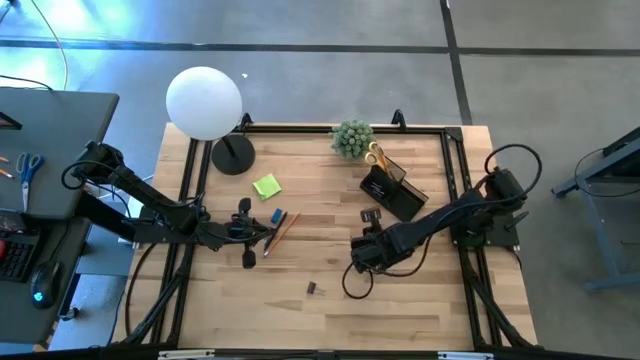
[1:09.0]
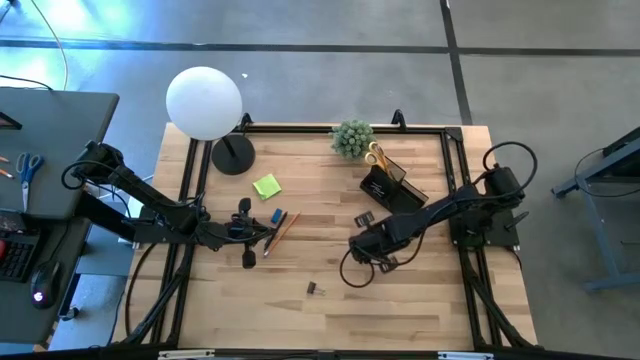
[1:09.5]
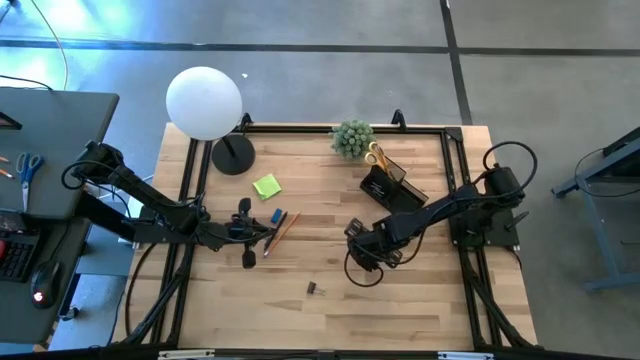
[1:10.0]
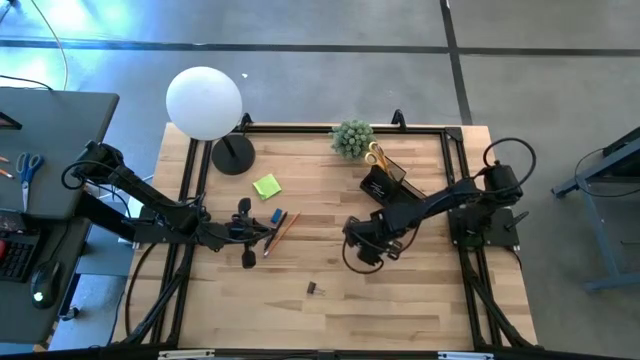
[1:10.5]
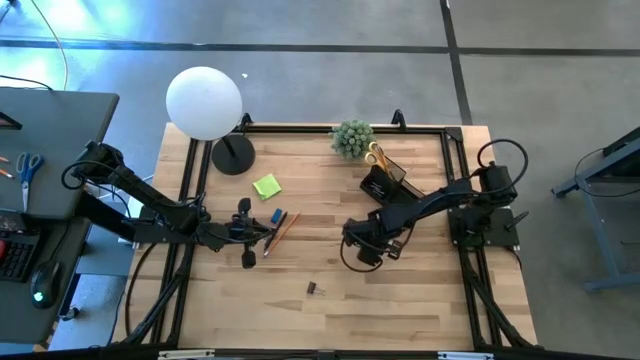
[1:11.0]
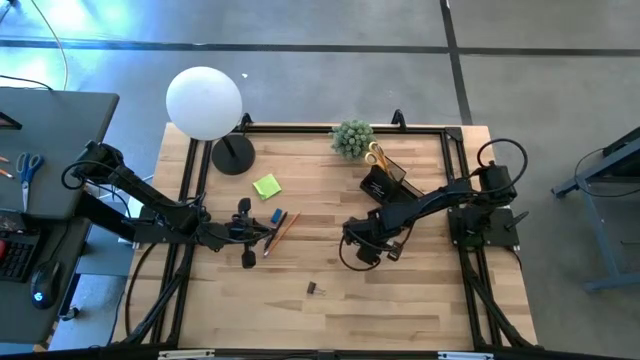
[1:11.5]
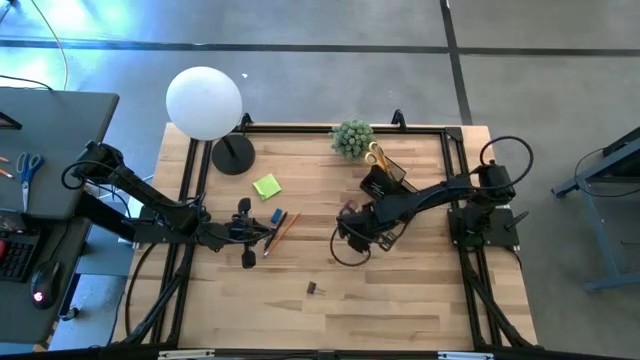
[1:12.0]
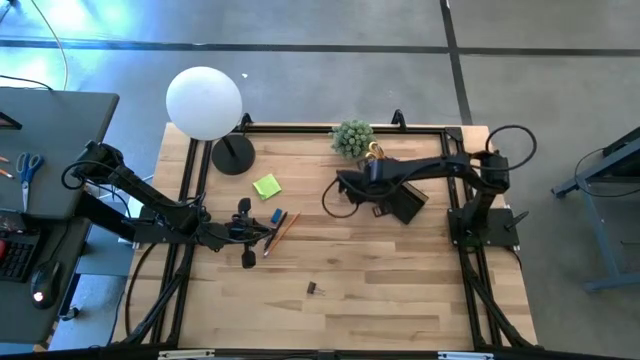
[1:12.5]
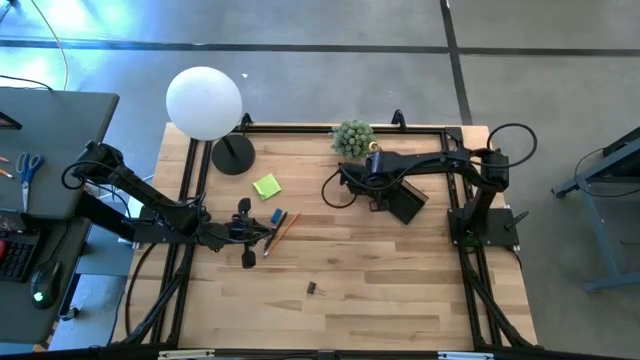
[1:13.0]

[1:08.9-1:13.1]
Task: Pick and place office supplies into organizer
Put the blue binder clip into the desk organizer

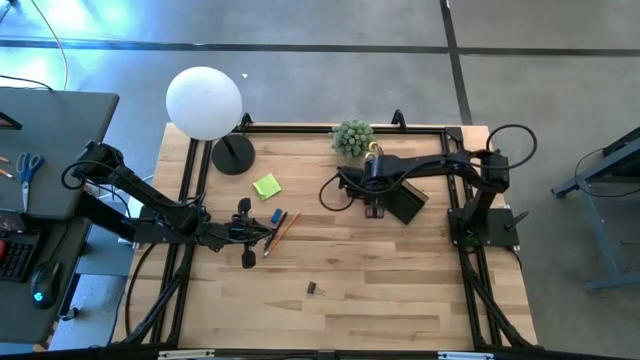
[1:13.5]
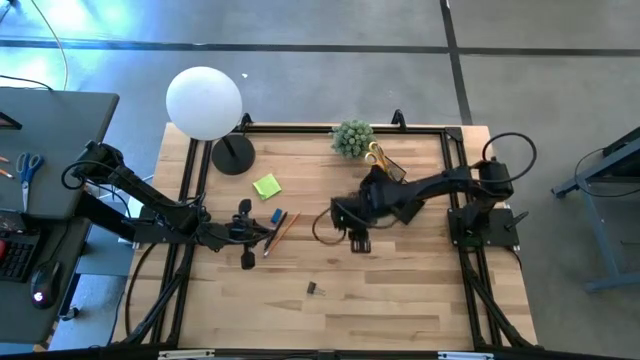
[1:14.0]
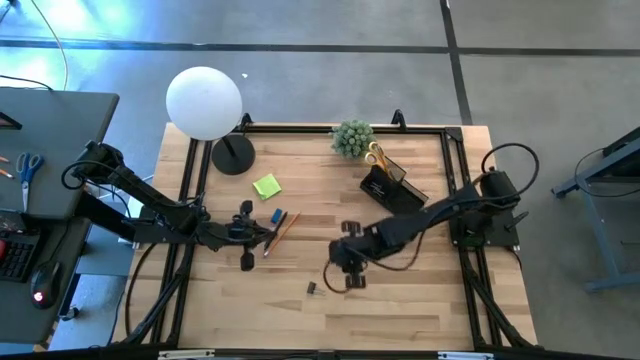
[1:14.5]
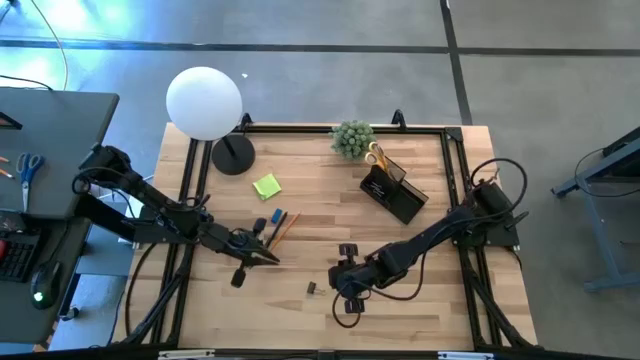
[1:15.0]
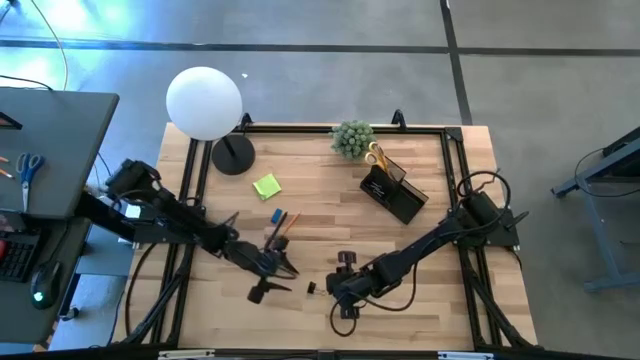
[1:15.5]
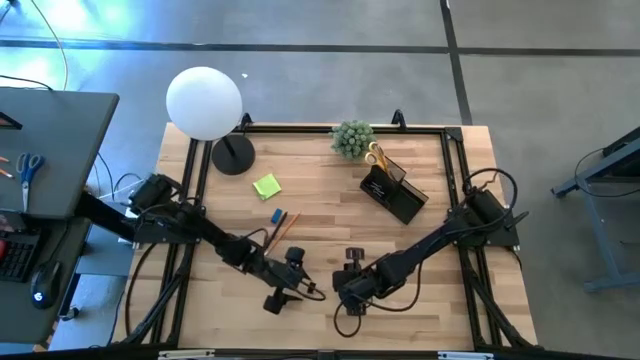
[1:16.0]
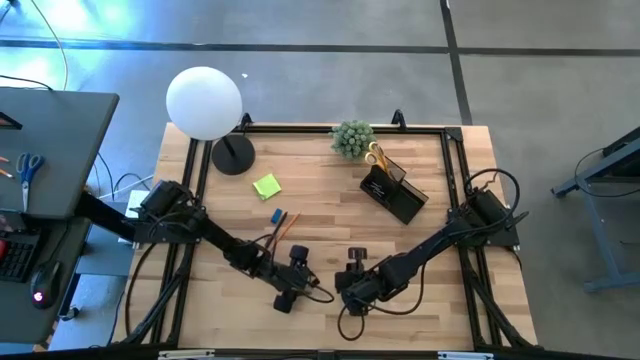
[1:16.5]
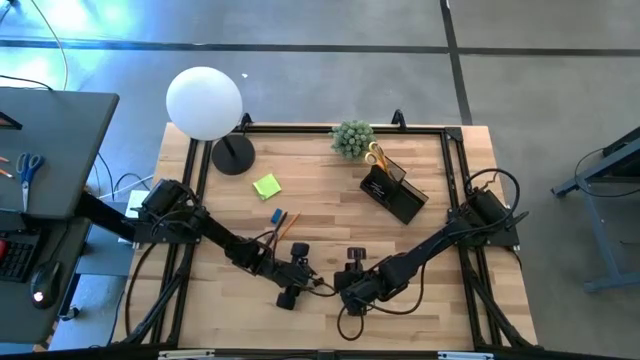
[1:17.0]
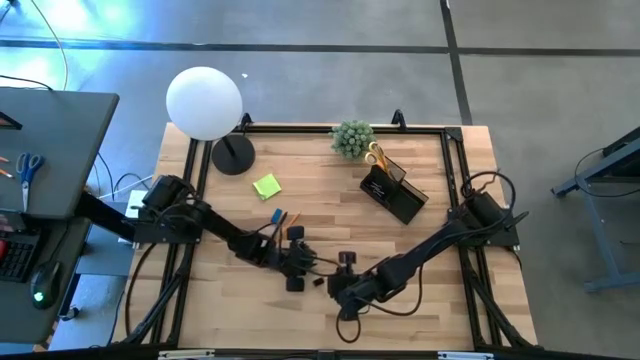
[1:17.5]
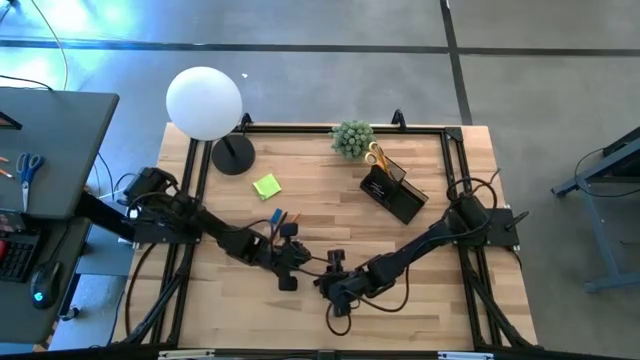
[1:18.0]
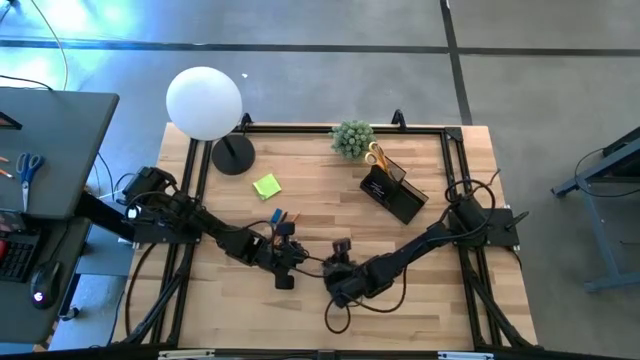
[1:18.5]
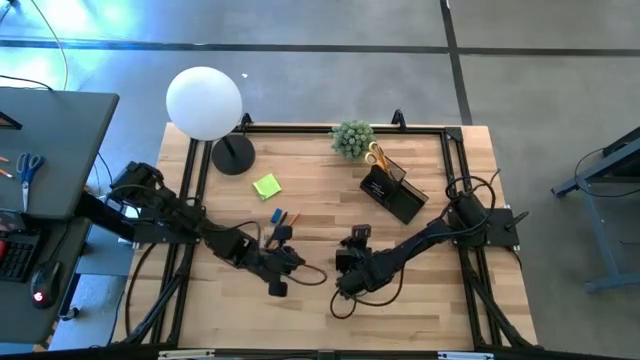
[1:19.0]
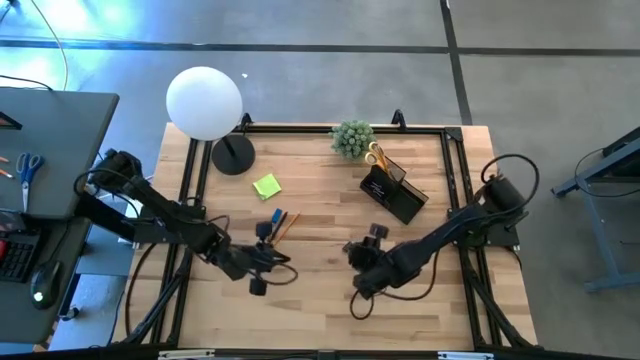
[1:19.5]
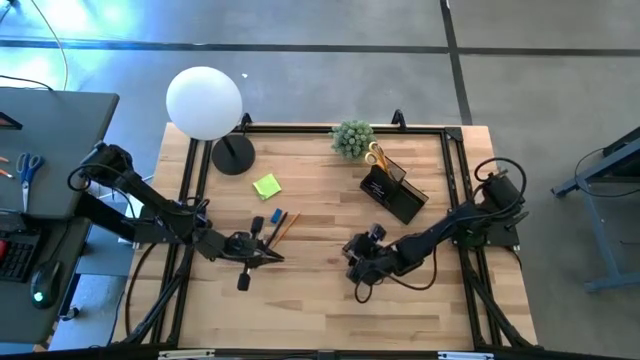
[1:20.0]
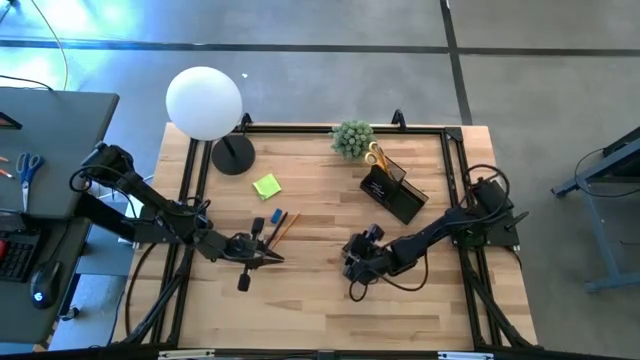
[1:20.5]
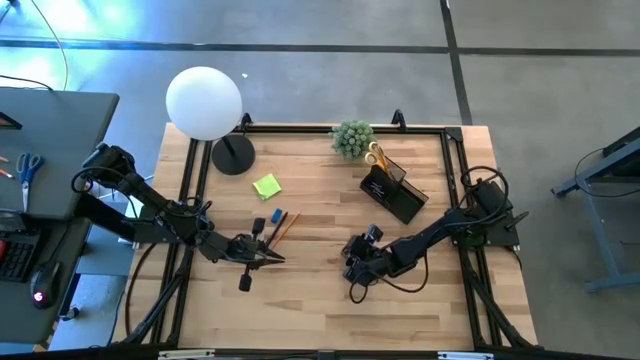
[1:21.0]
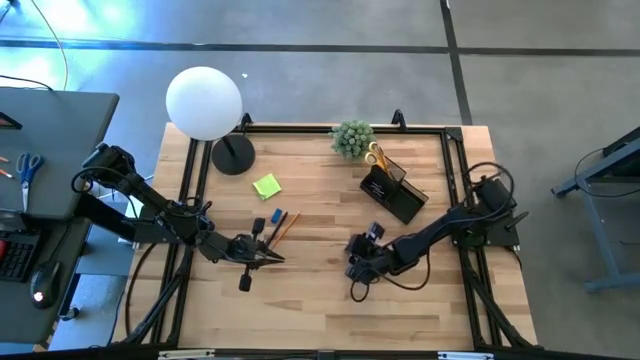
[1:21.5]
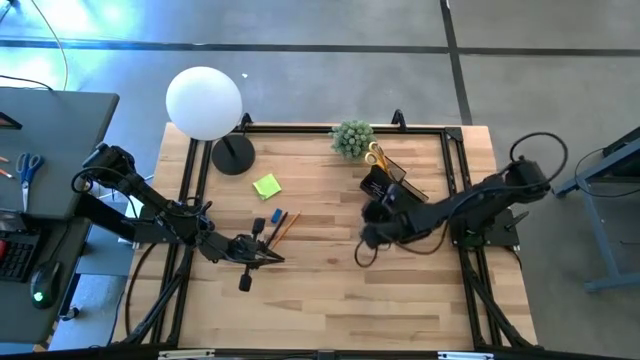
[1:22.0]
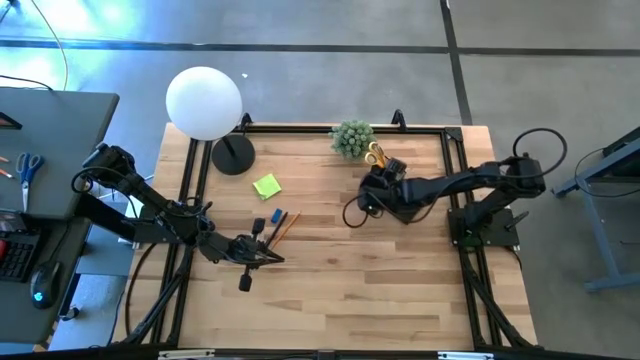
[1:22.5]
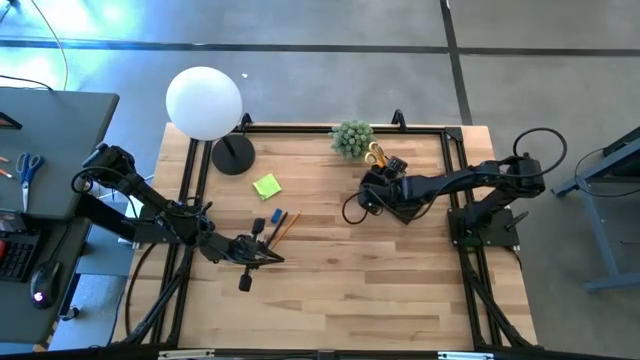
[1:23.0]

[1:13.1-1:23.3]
Put the black binder clip into the desk organizer

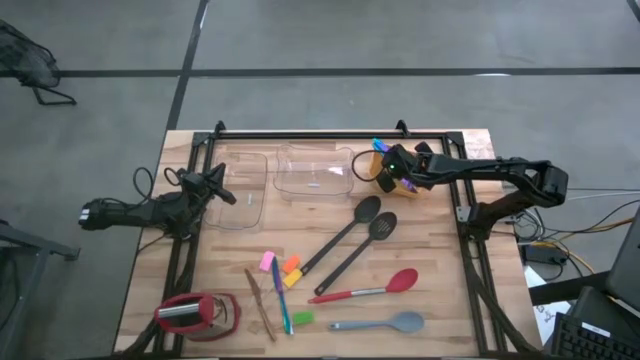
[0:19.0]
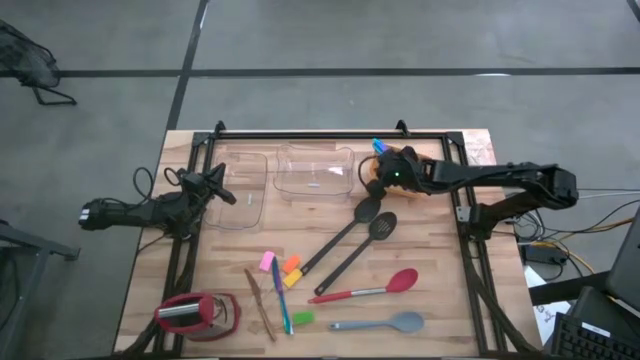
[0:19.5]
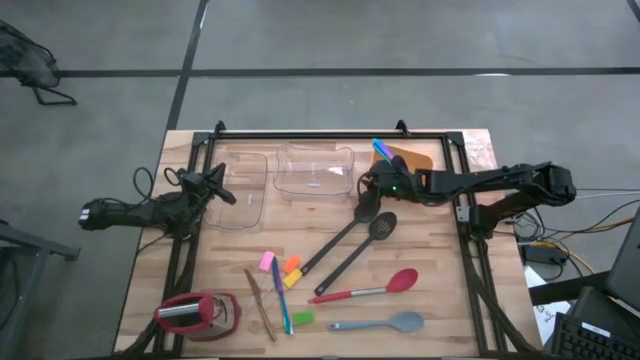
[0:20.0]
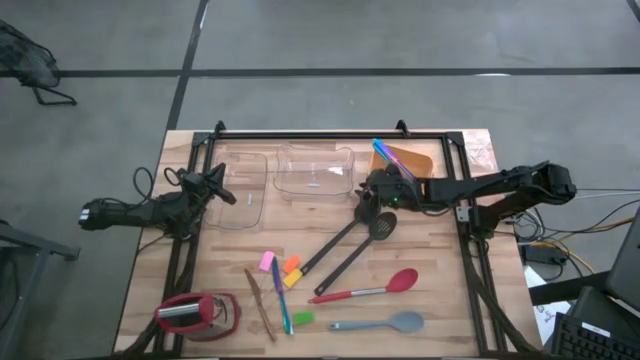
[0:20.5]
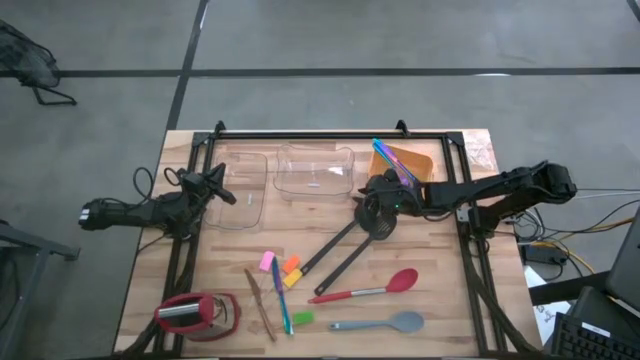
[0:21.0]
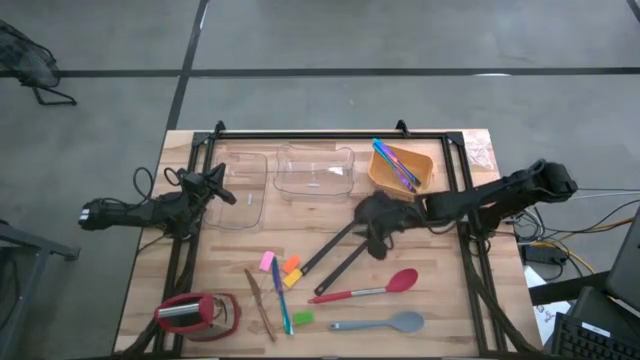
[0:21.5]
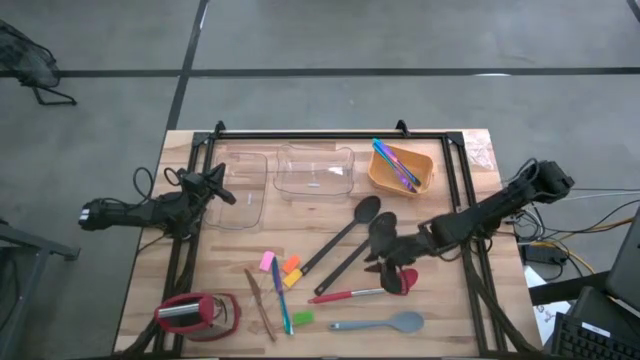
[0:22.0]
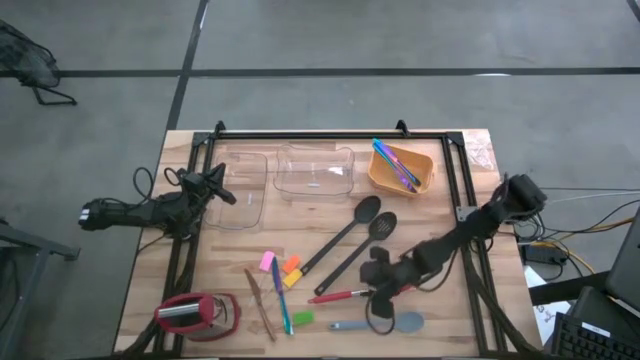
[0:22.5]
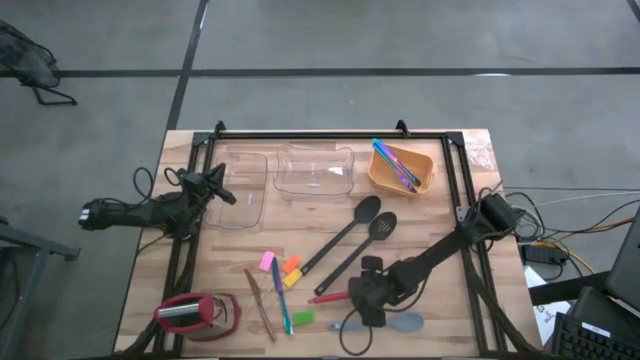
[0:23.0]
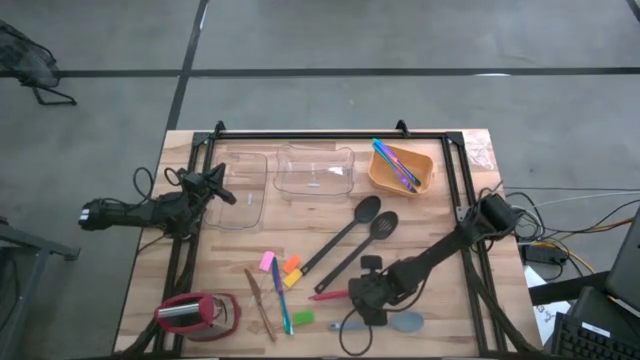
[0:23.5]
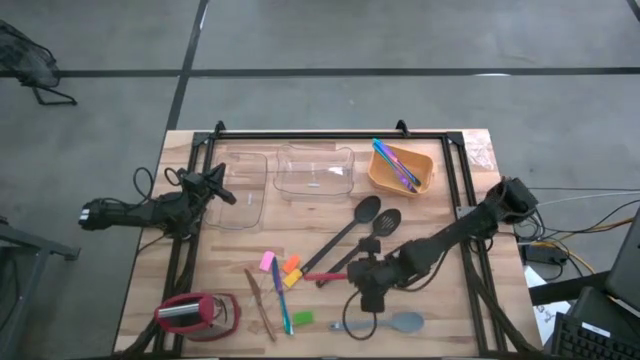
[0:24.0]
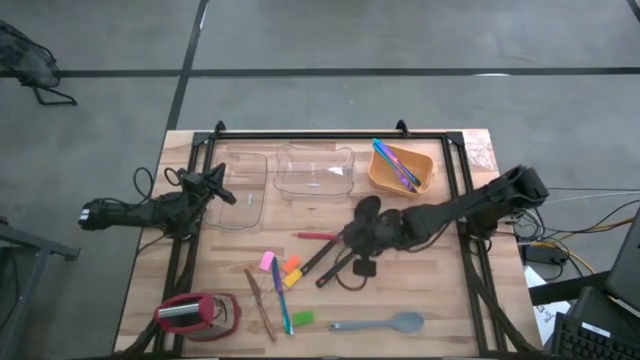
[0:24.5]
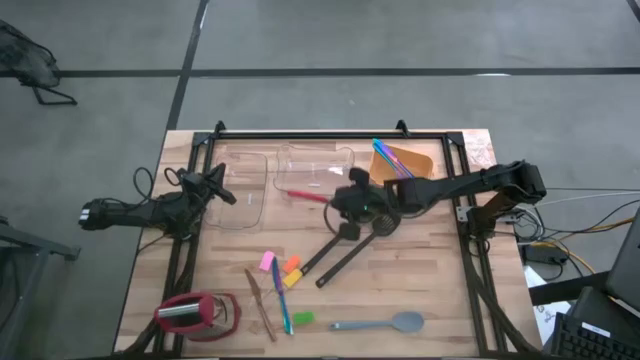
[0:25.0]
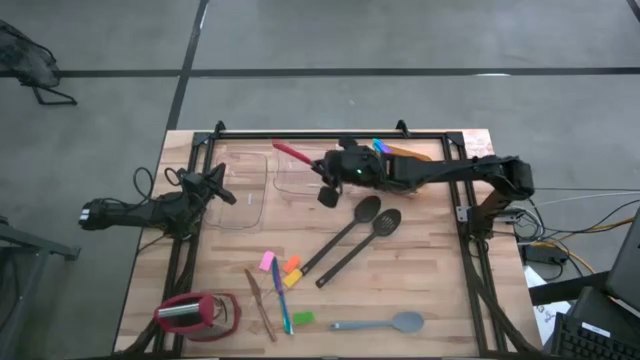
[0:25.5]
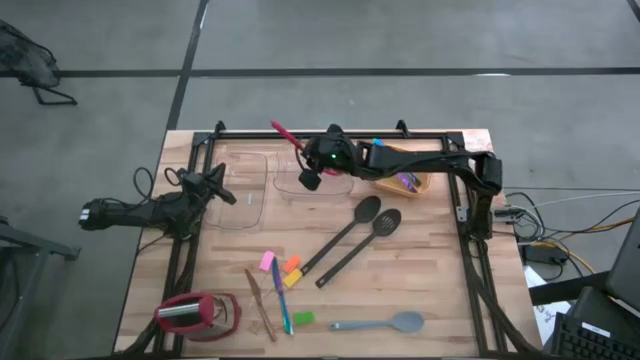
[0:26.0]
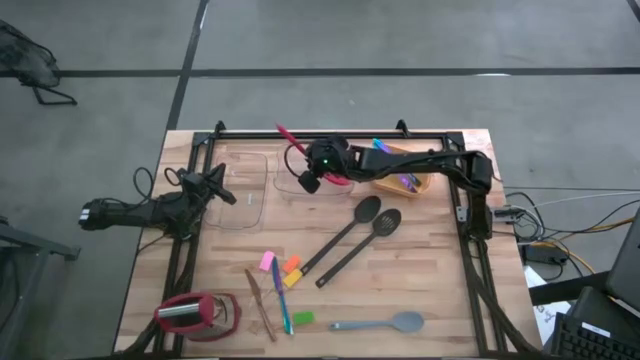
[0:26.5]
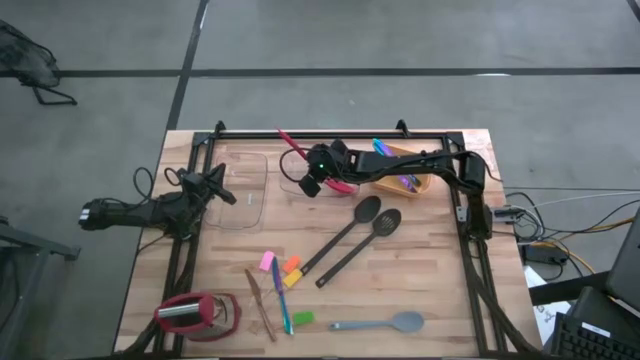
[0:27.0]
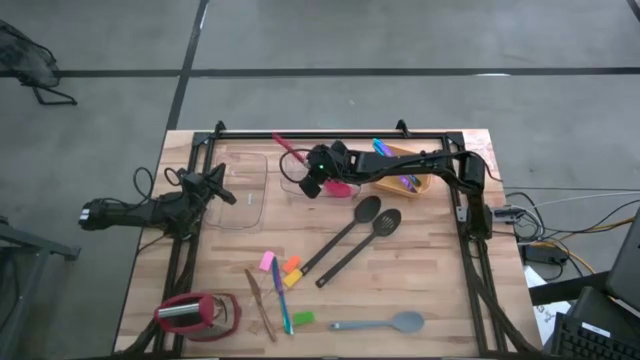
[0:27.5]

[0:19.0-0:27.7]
Task: Sort silverware by color (type)
Put the red serving spoon into the right transparent bin
